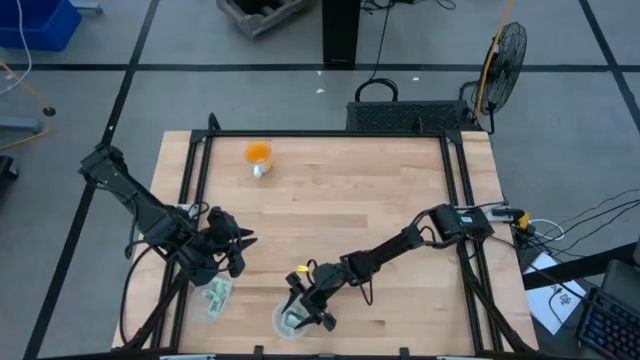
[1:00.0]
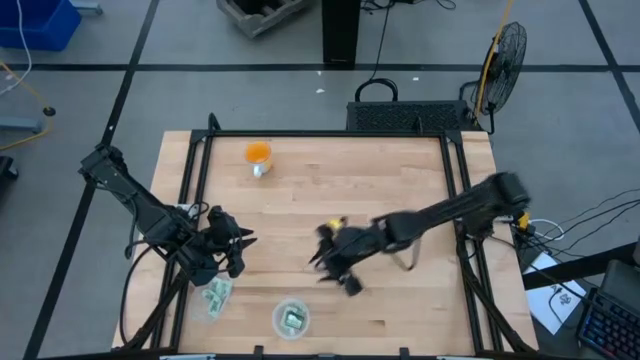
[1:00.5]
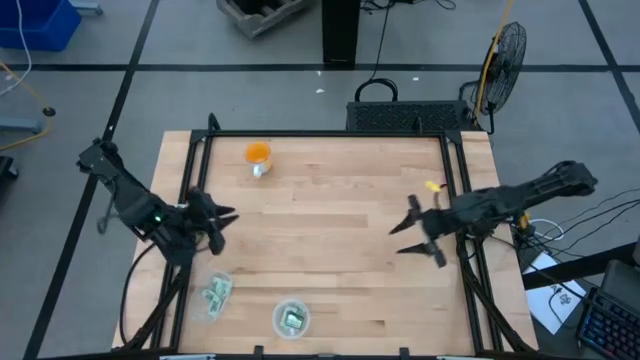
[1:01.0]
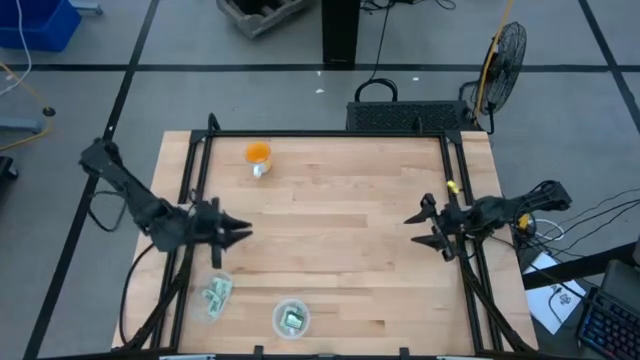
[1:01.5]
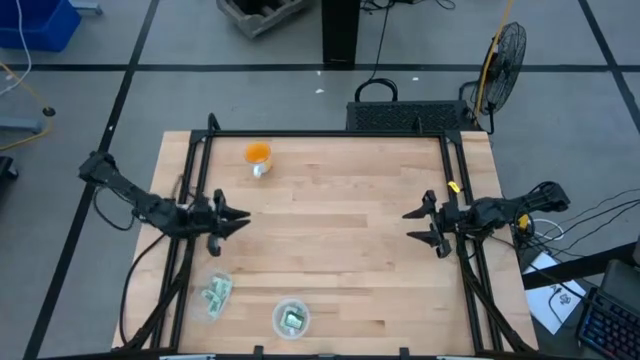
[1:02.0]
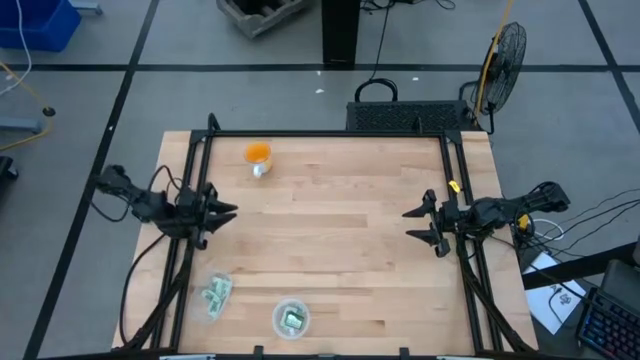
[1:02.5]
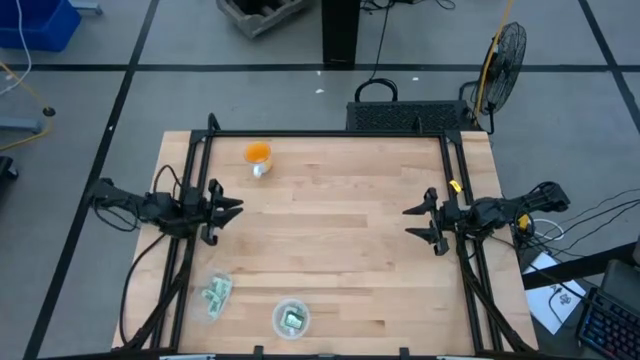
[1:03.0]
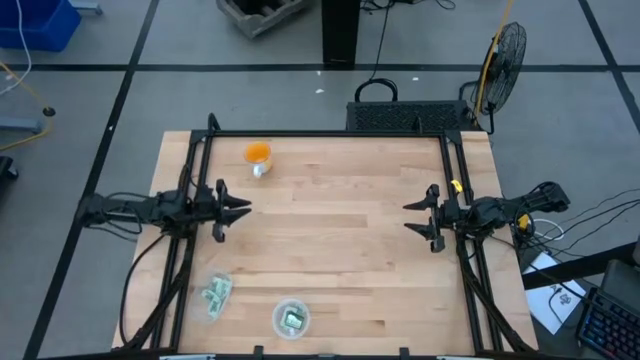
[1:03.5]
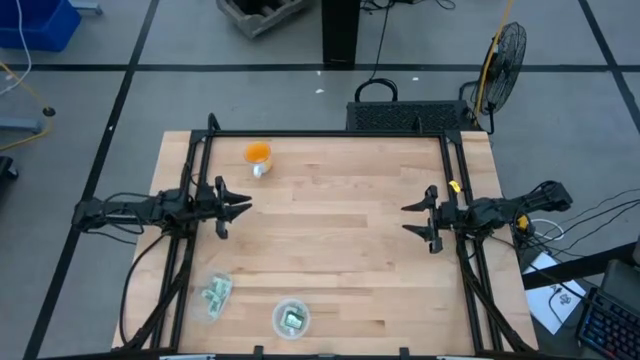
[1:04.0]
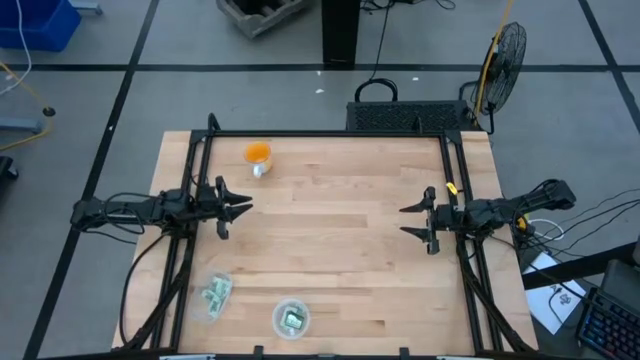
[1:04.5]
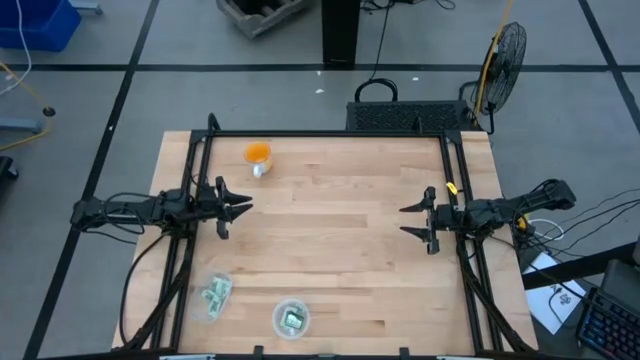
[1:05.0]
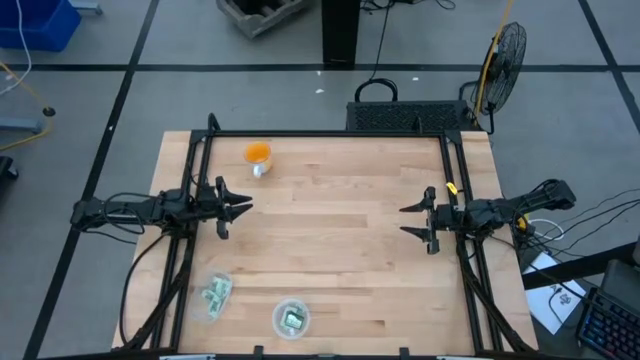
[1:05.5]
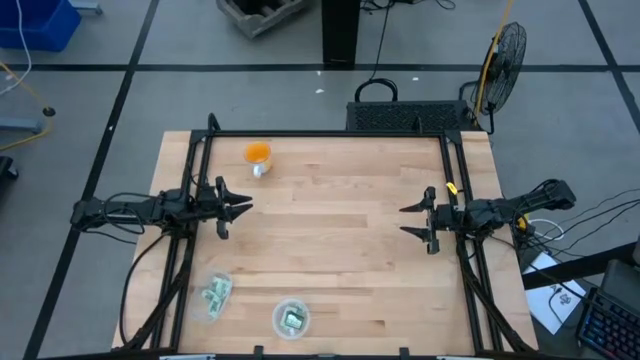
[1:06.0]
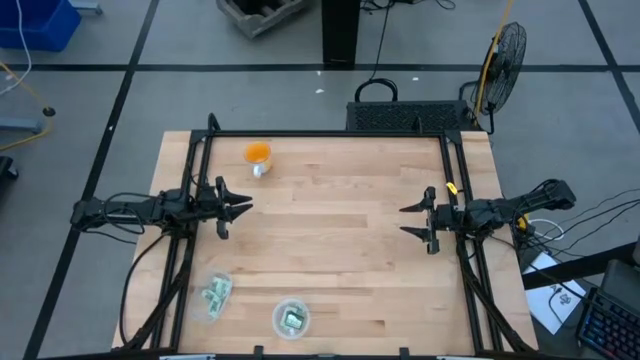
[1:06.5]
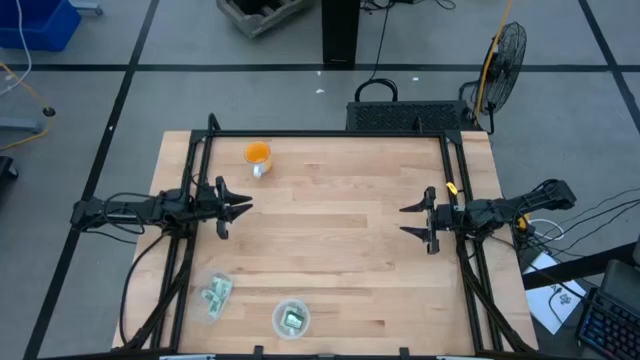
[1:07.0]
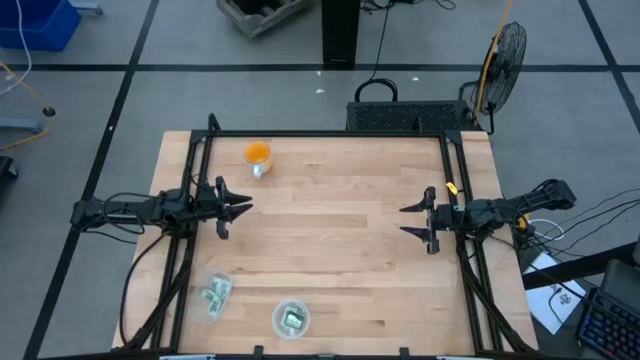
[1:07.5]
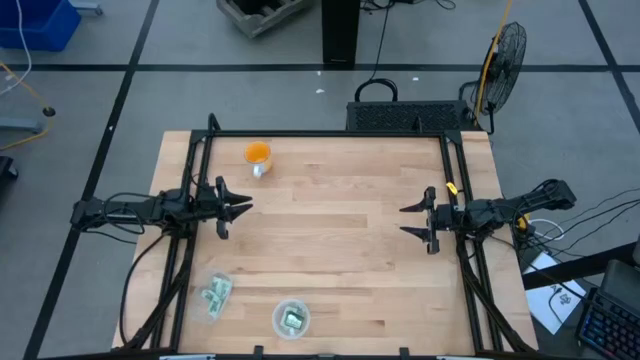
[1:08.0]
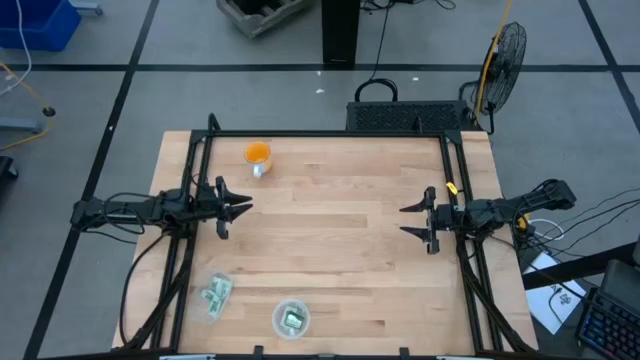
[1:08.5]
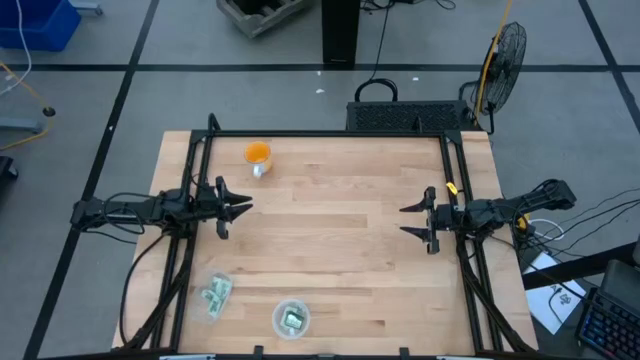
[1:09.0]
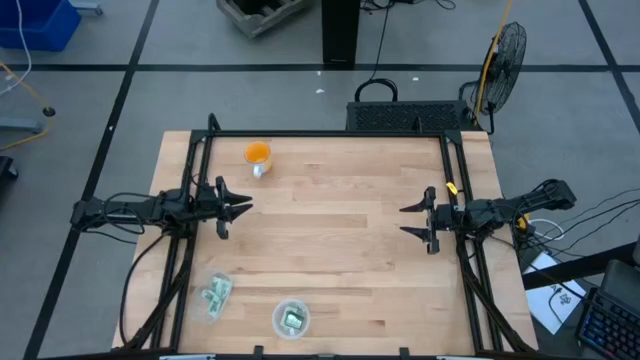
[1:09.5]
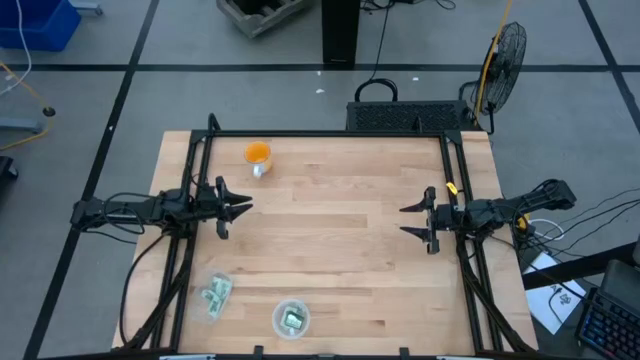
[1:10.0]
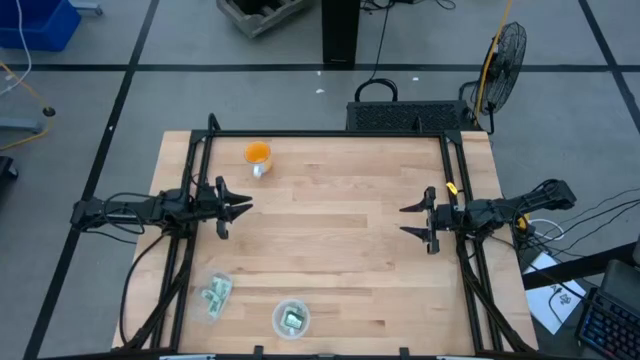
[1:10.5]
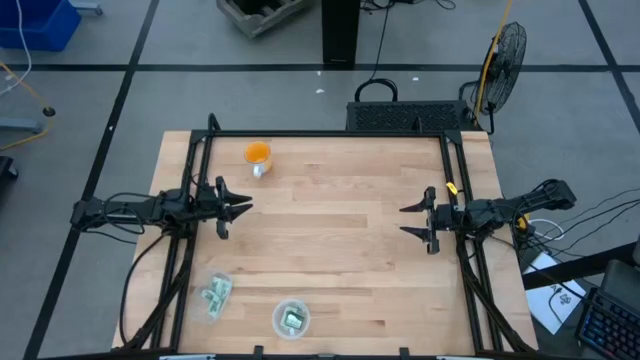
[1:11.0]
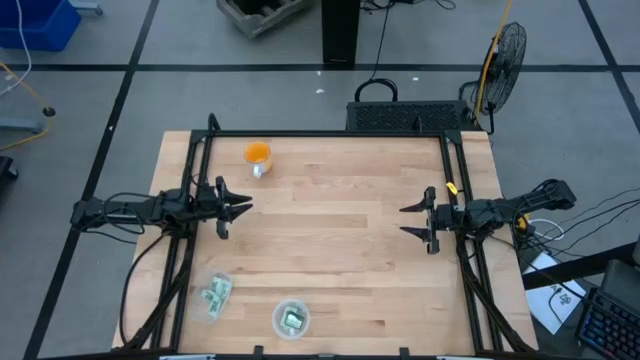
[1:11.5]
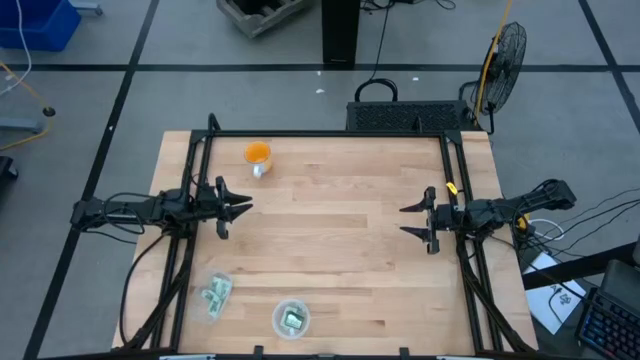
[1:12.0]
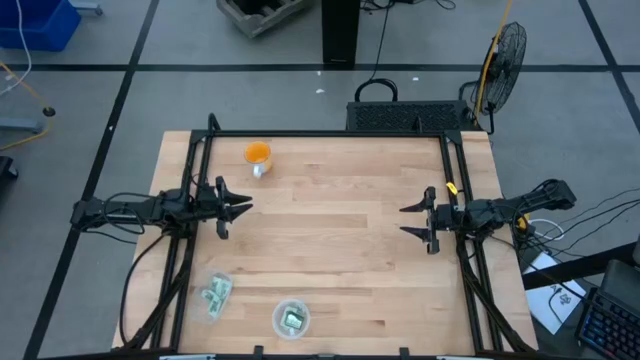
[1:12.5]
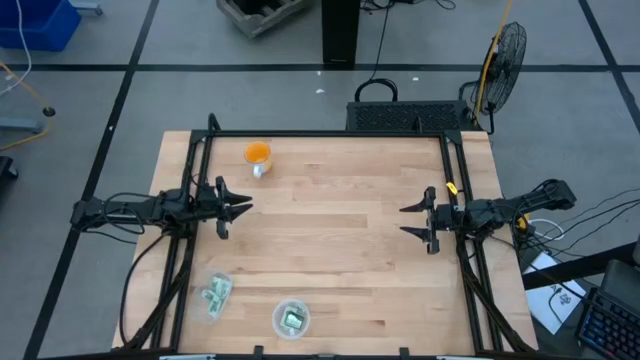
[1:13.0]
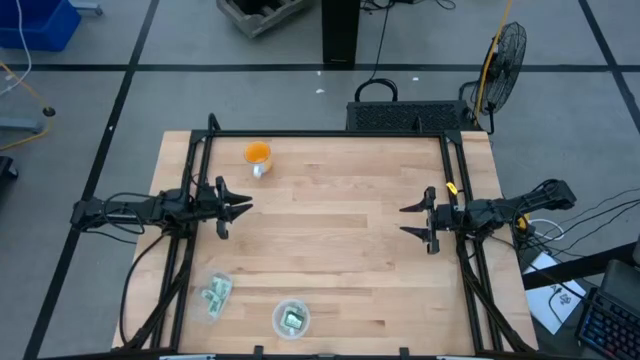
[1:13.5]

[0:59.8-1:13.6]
Task: Pick and place items into bin
Return to Home Position

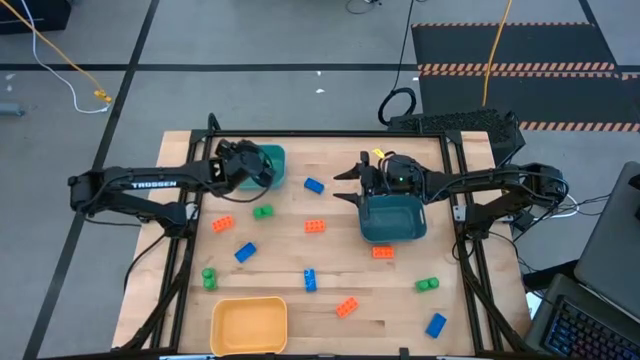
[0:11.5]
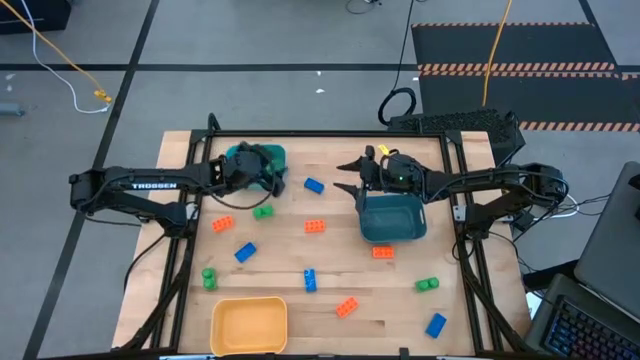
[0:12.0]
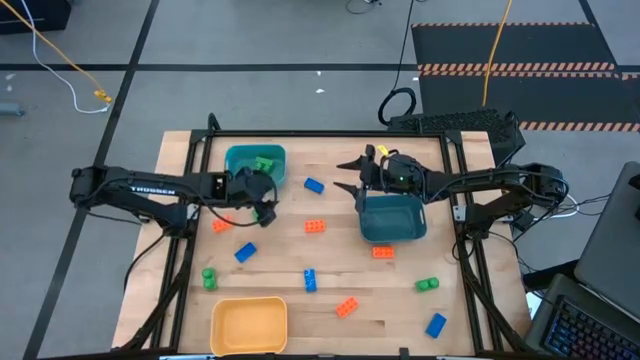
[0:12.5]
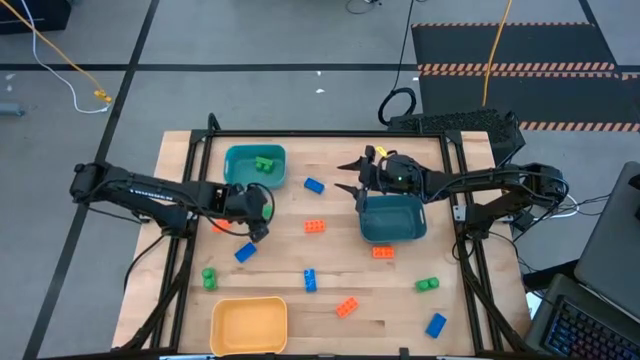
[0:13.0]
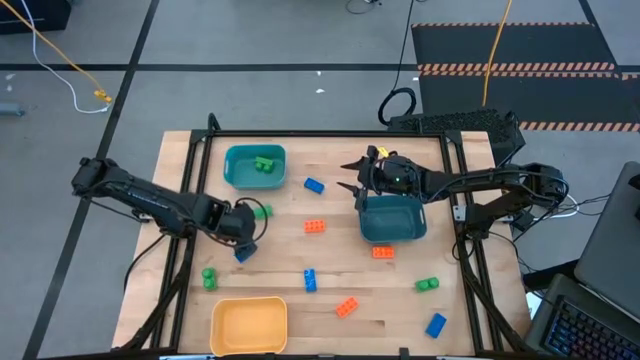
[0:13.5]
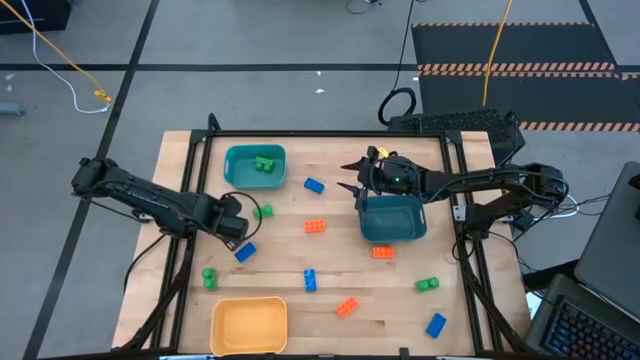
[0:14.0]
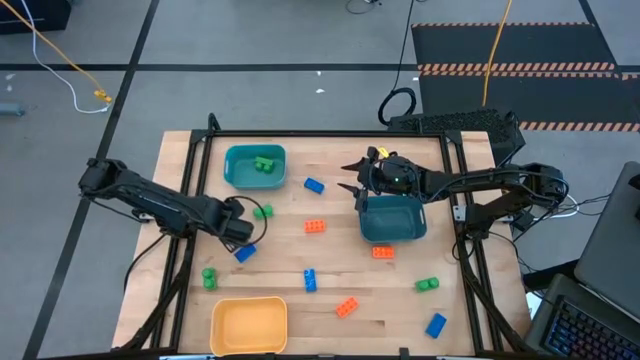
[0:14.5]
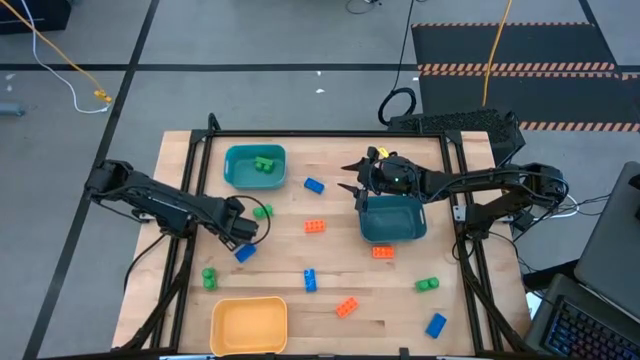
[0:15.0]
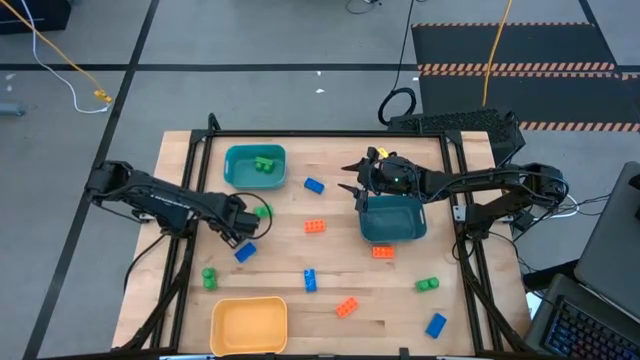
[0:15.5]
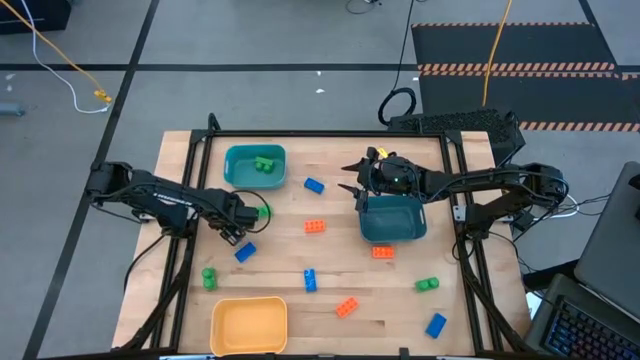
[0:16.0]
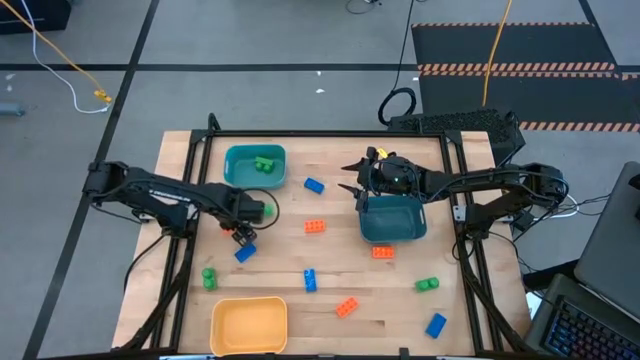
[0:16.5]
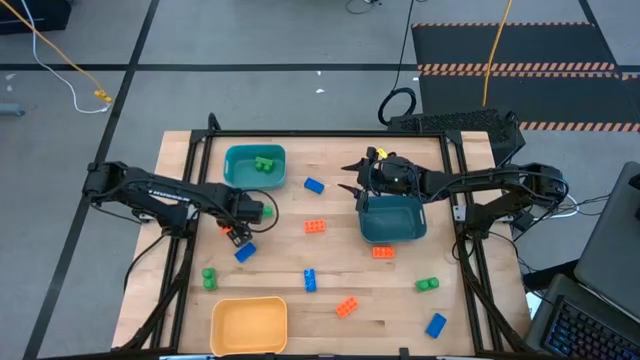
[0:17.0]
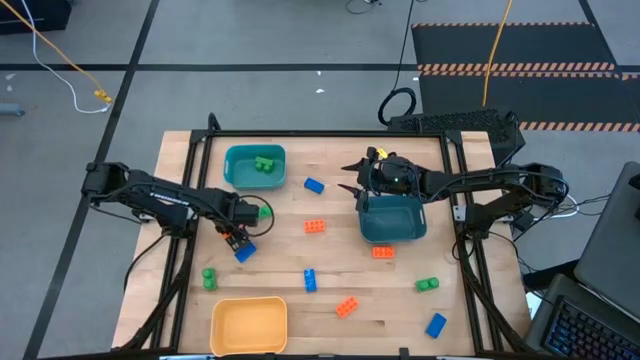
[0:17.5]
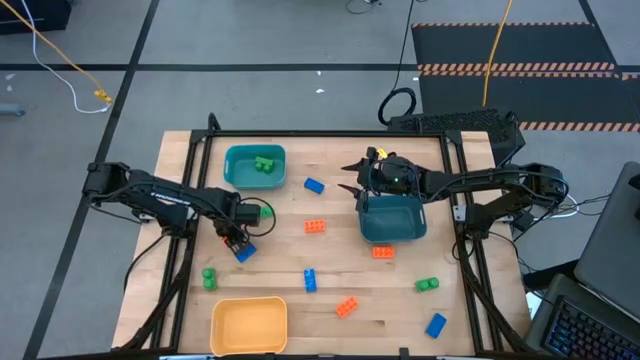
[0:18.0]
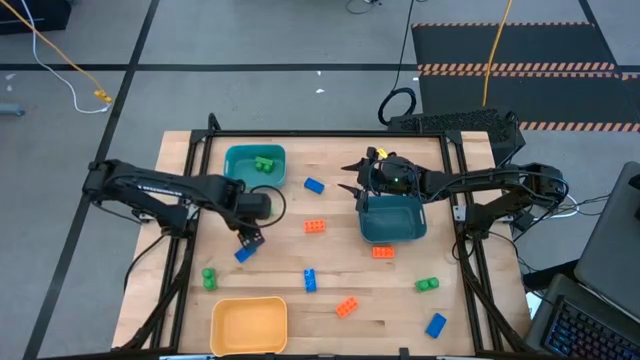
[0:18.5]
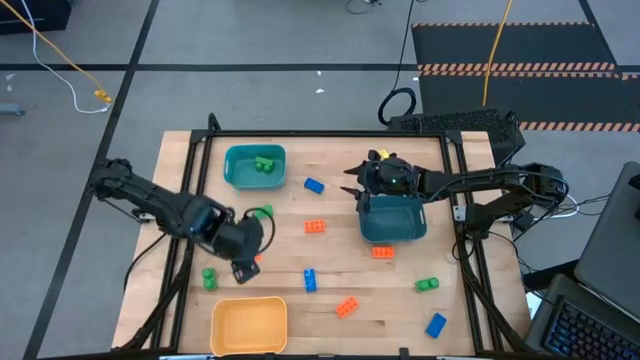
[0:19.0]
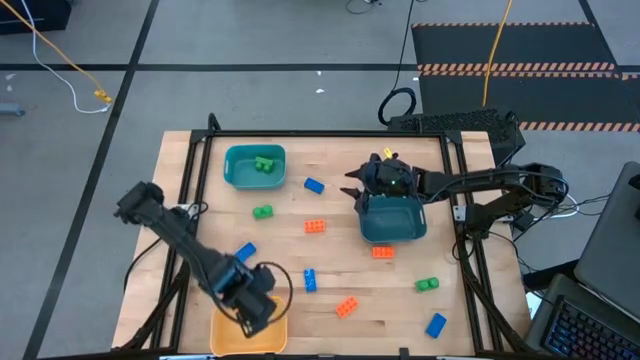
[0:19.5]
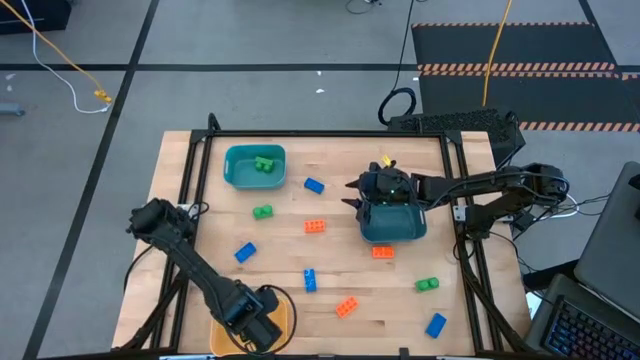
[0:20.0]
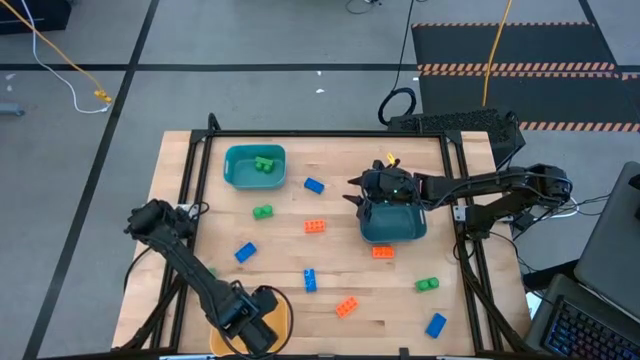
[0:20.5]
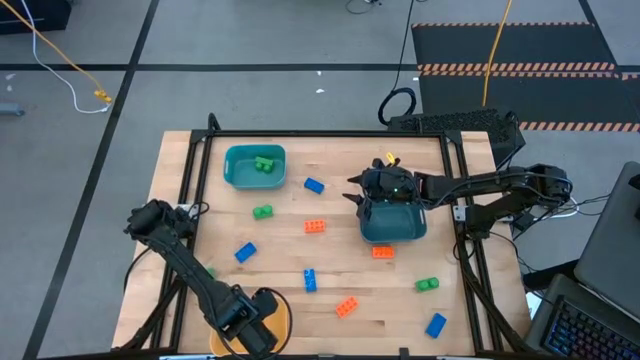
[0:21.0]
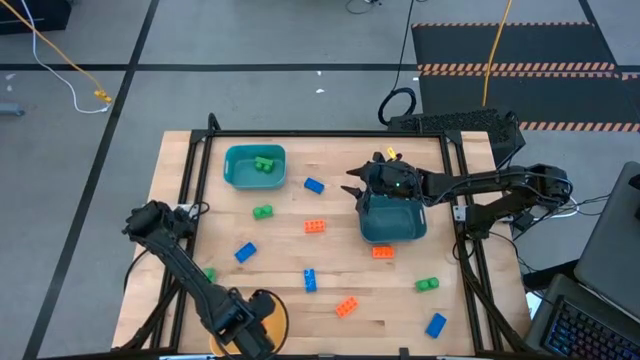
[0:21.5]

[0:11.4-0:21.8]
Task: Sort & place blocks by color
Put the orange game piece into the yellow bin
